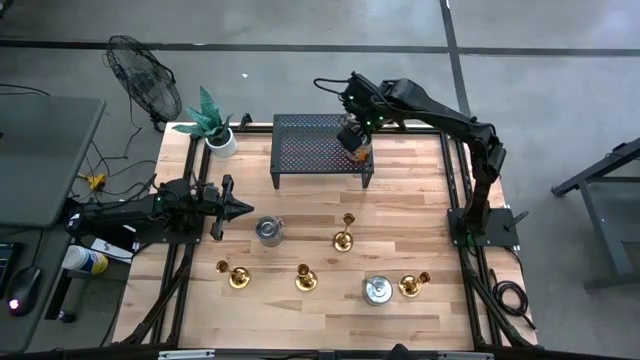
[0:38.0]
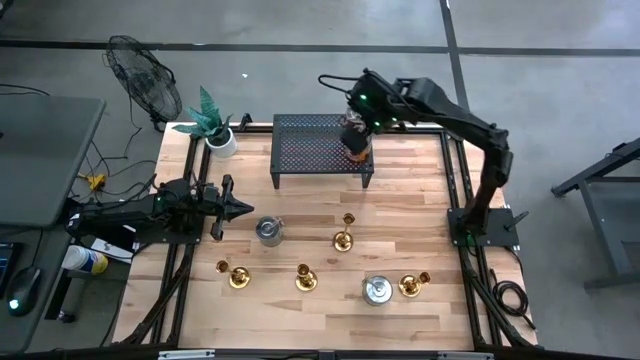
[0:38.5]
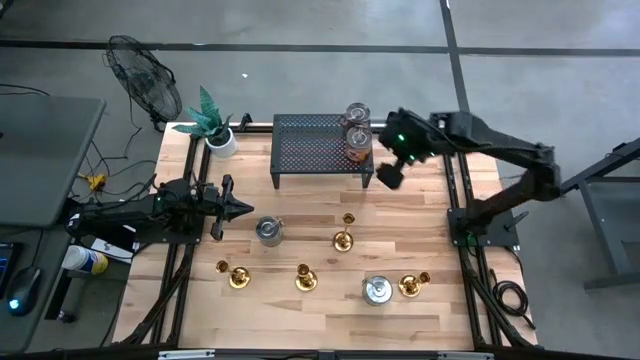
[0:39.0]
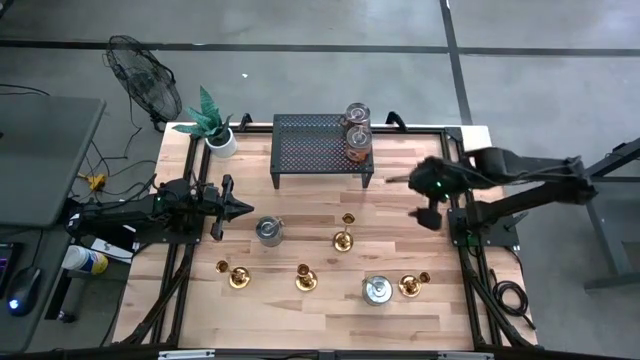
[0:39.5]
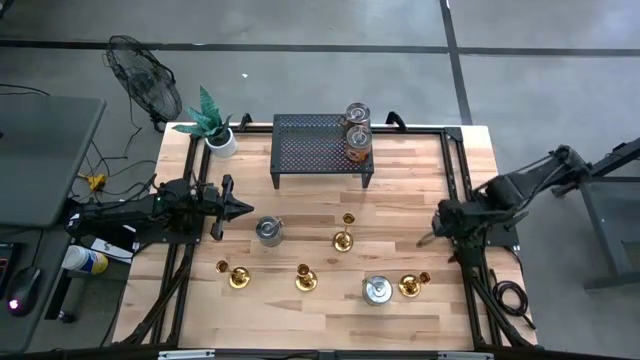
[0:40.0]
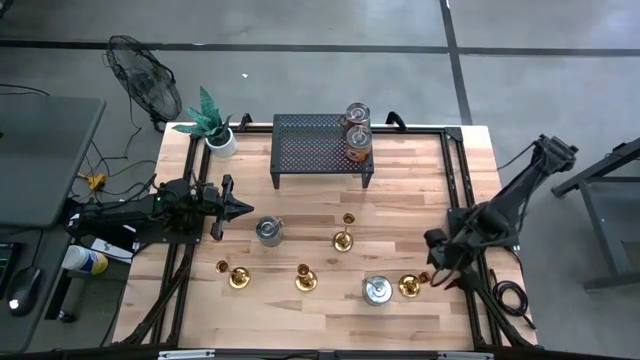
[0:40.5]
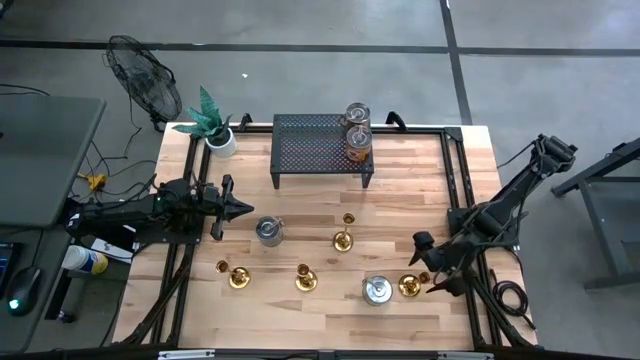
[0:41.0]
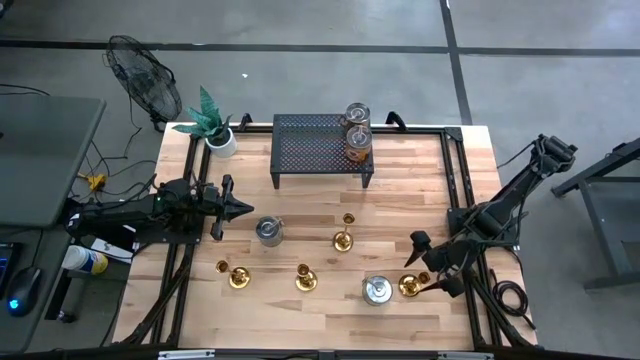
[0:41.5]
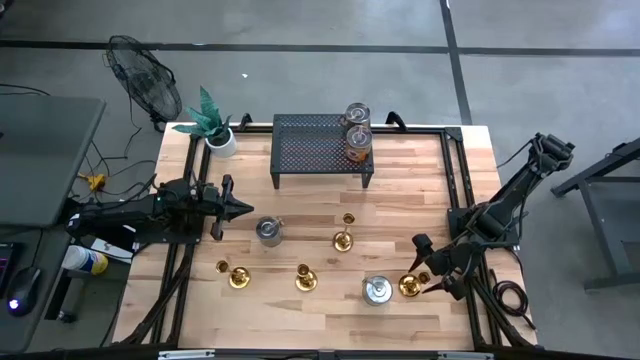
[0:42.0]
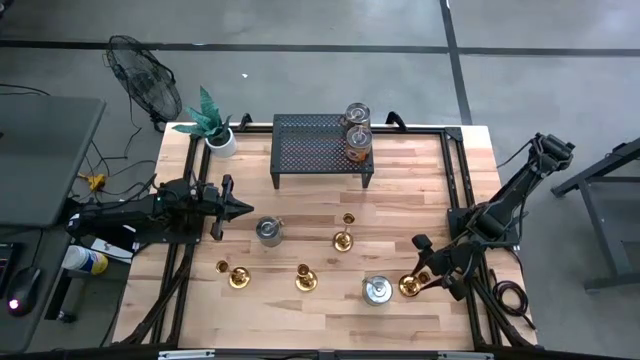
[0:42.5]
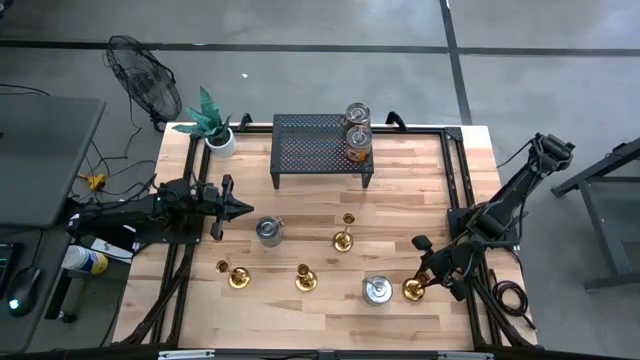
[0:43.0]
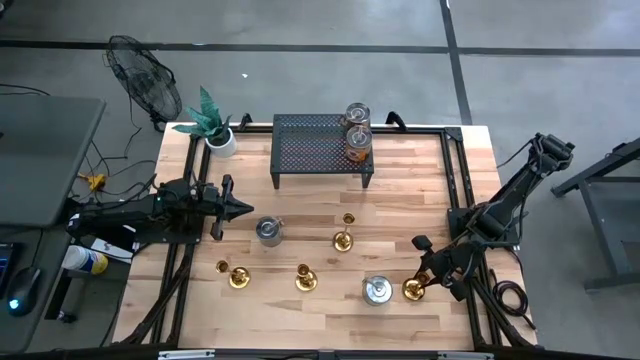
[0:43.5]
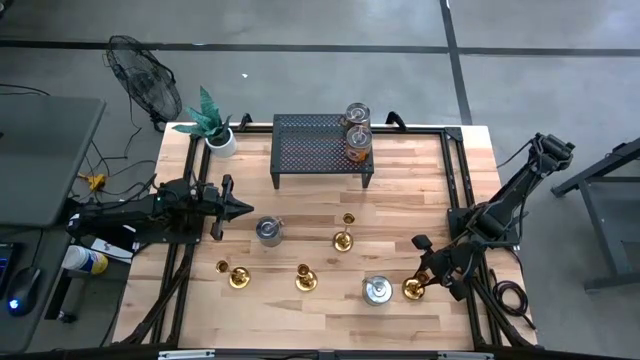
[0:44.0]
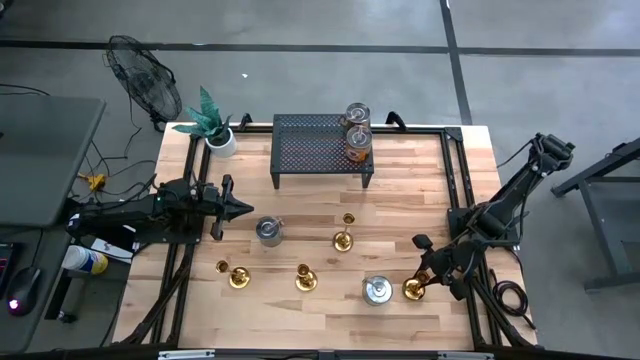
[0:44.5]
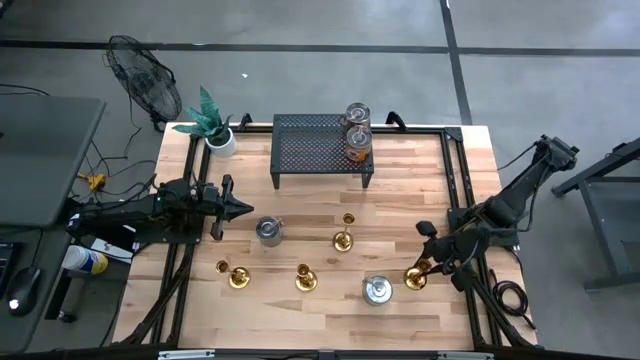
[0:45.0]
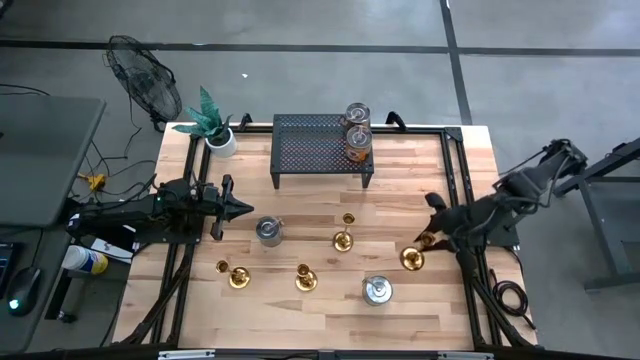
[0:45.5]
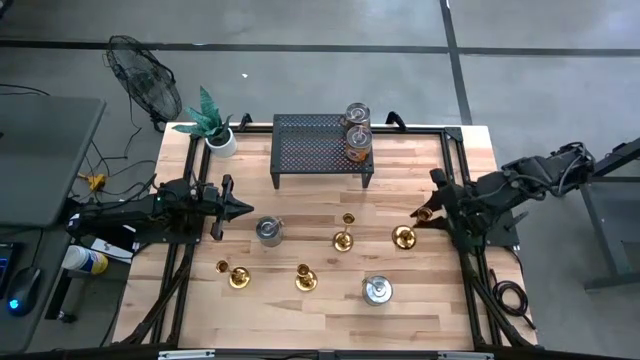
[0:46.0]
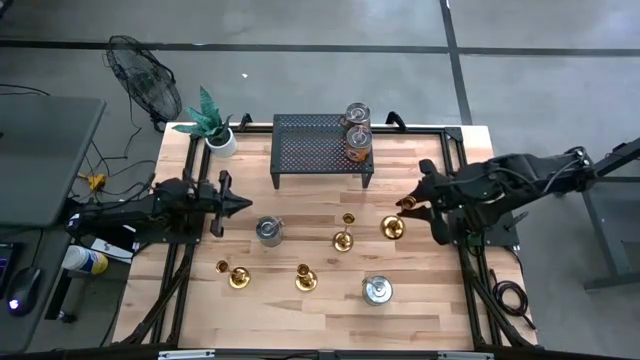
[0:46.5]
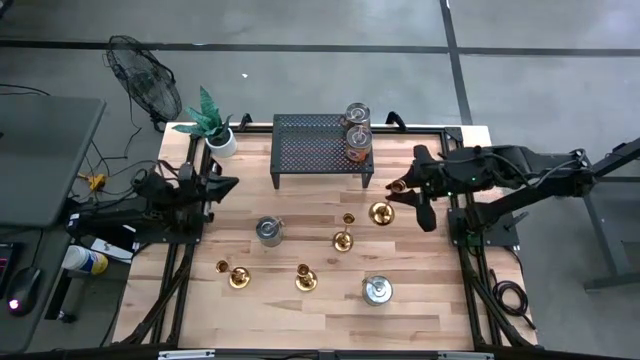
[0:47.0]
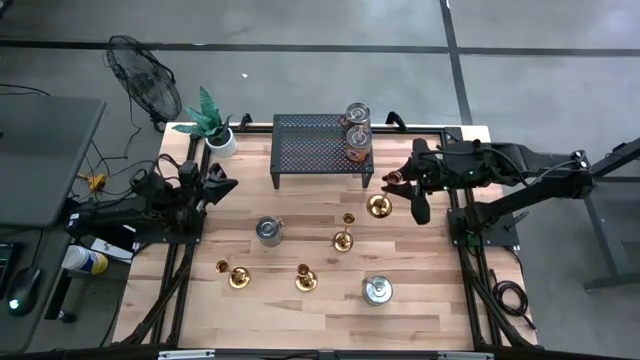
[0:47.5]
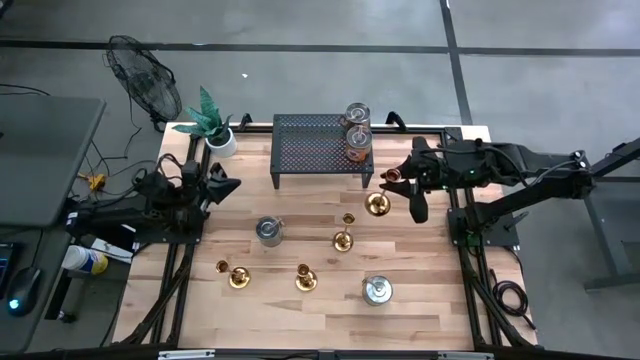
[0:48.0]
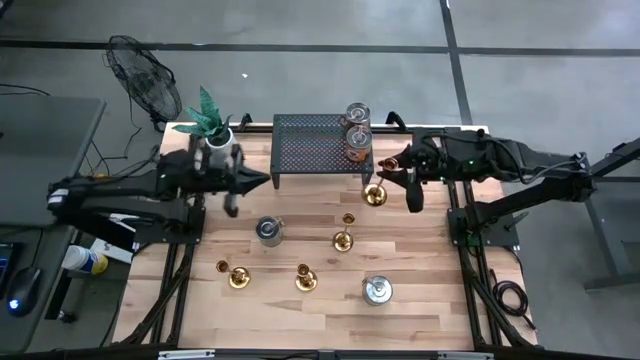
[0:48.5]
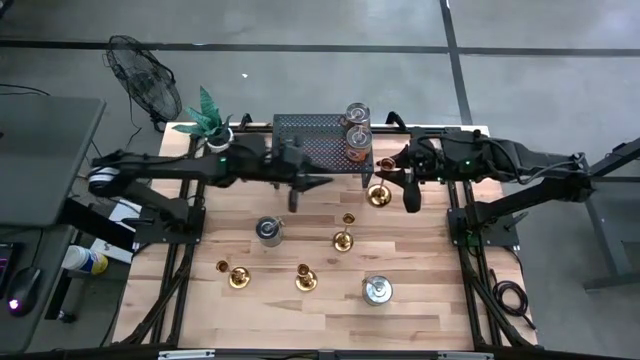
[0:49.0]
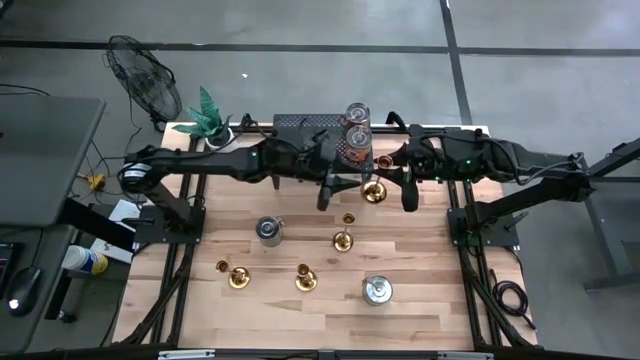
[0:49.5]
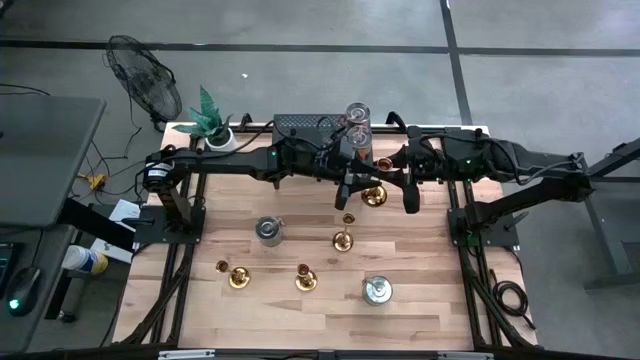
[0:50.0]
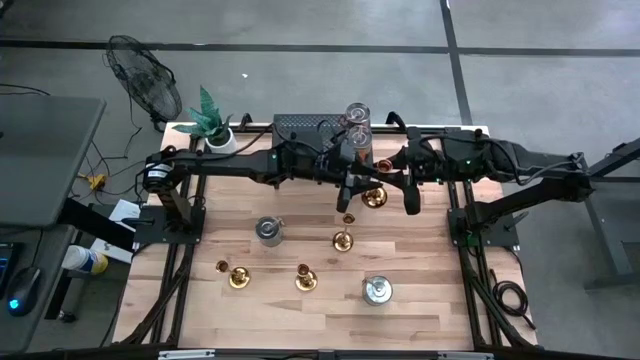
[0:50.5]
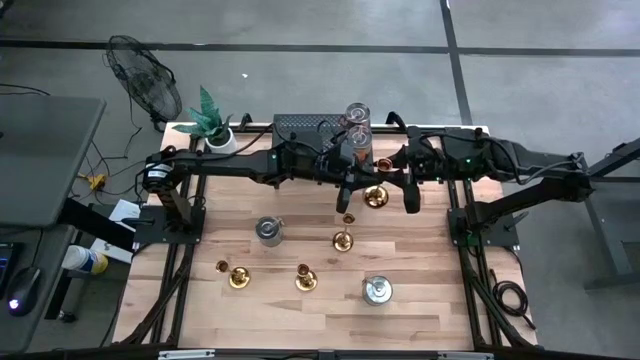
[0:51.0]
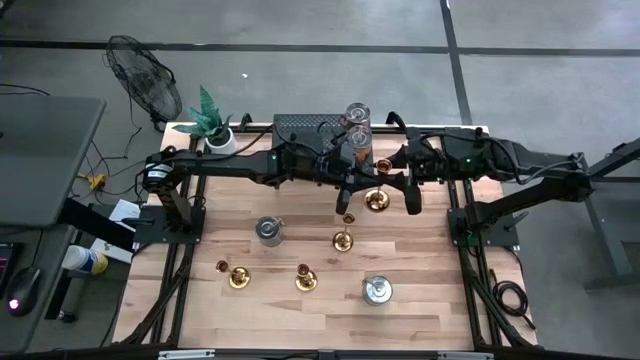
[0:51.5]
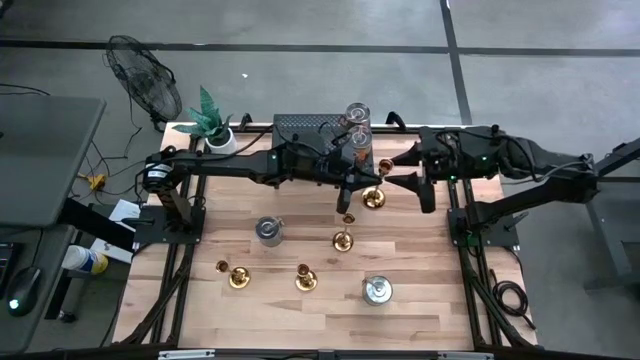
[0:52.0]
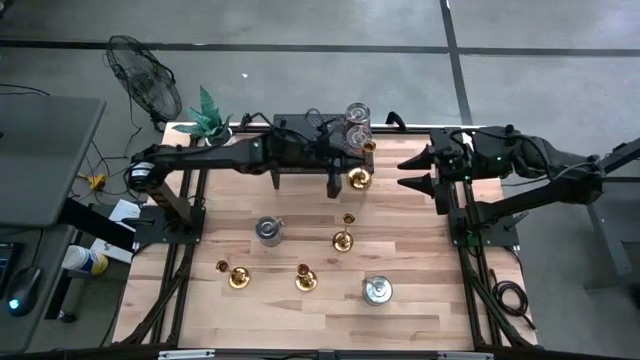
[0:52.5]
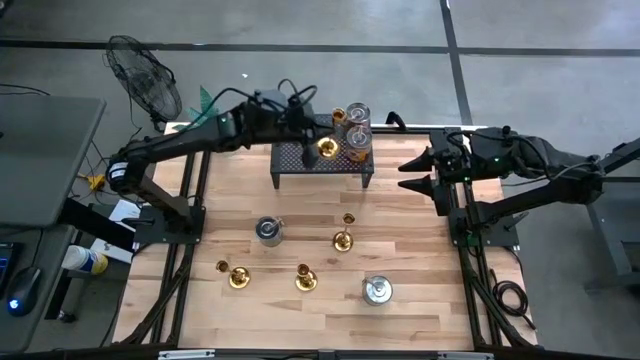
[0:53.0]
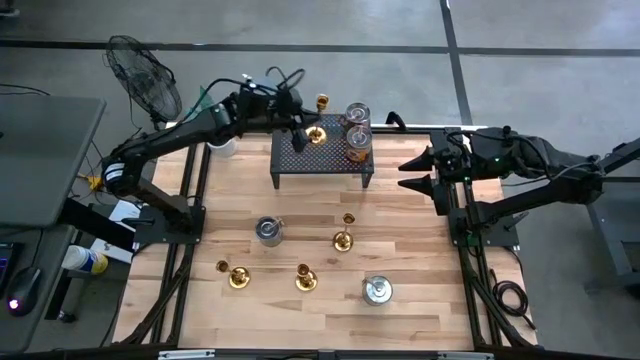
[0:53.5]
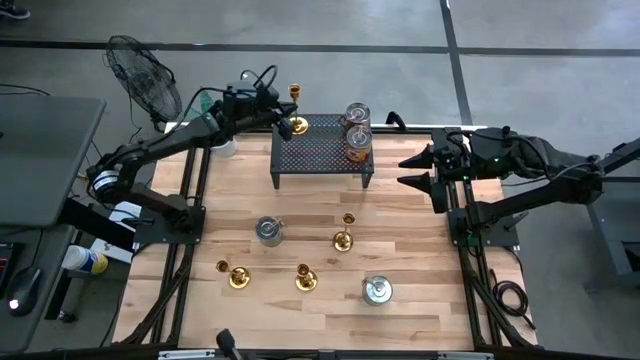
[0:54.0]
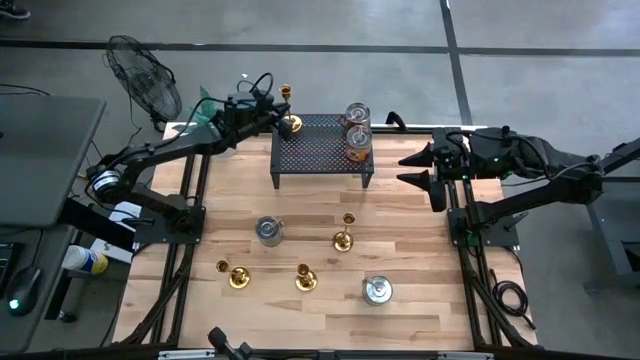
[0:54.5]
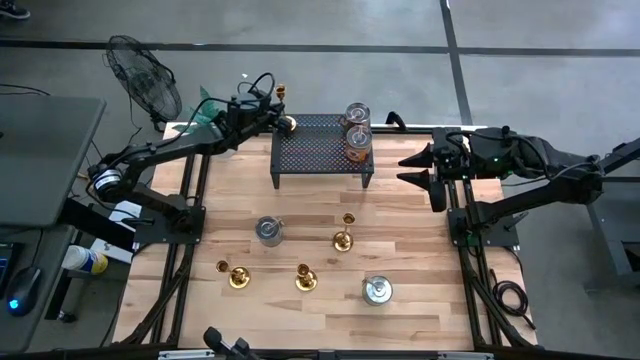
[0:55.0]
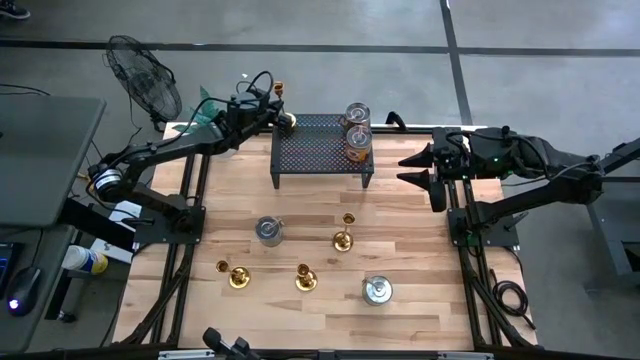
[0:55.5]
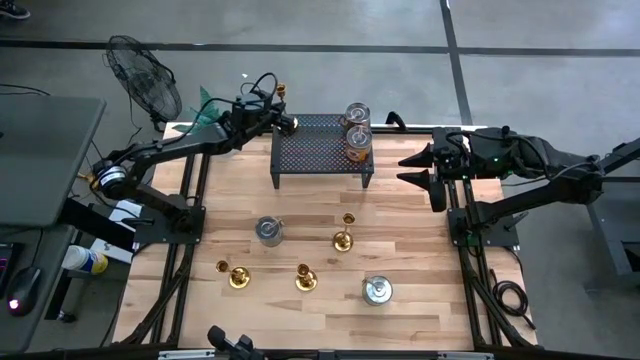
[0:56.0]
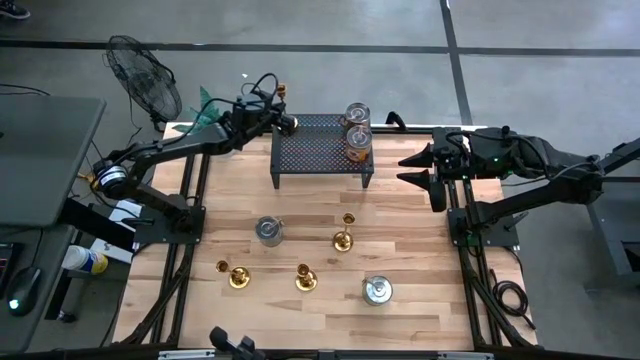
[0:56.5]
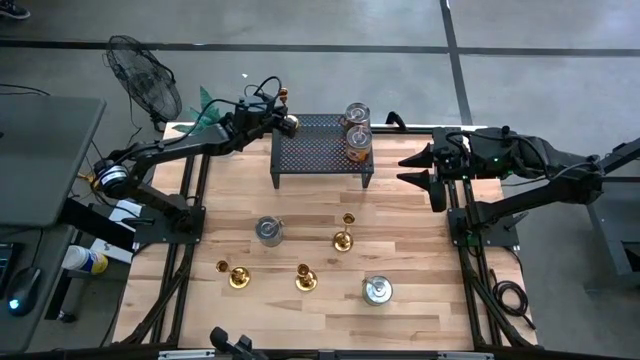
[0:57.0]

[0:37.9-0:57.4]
Task: Pick & Place candle stick holders
Put the gold candle holder on the shelf

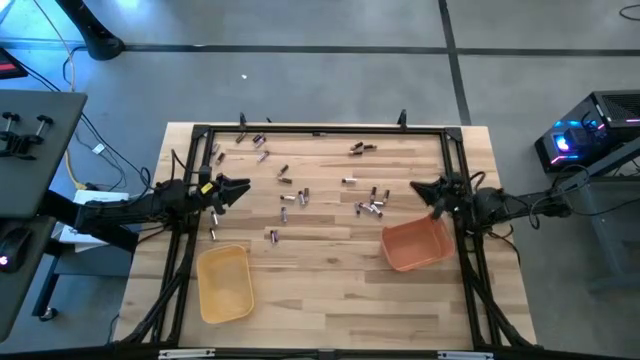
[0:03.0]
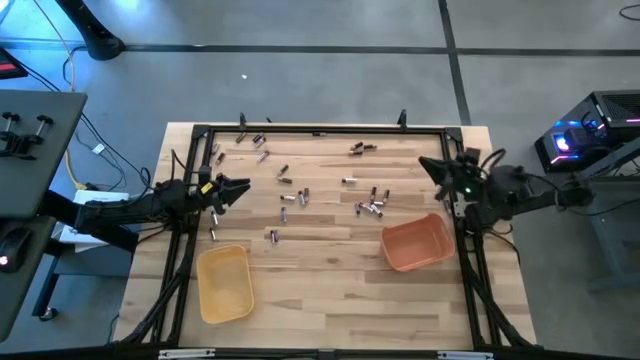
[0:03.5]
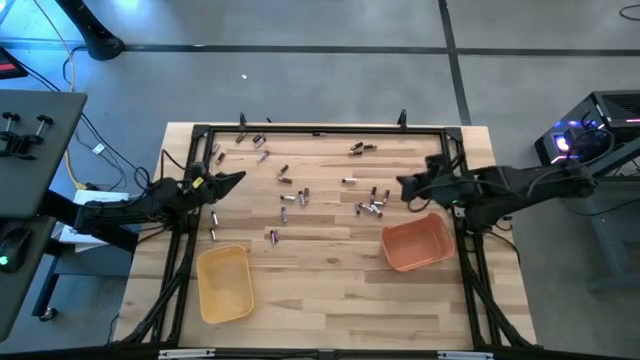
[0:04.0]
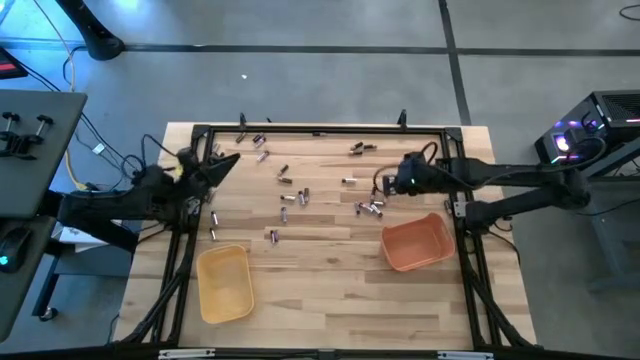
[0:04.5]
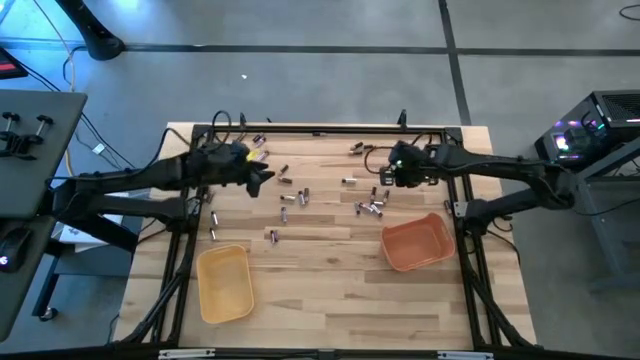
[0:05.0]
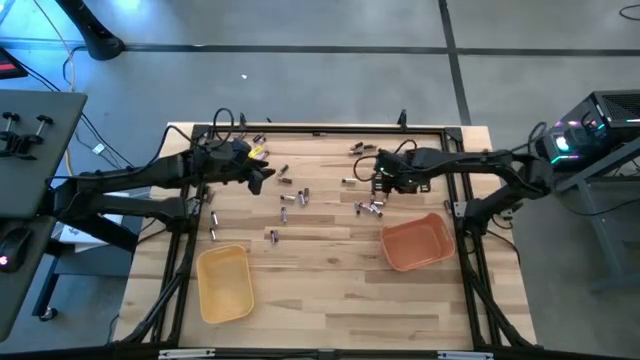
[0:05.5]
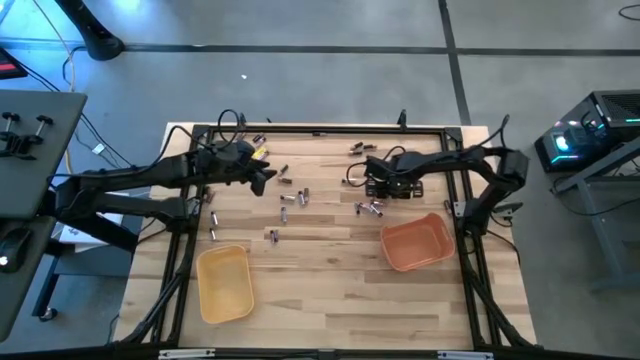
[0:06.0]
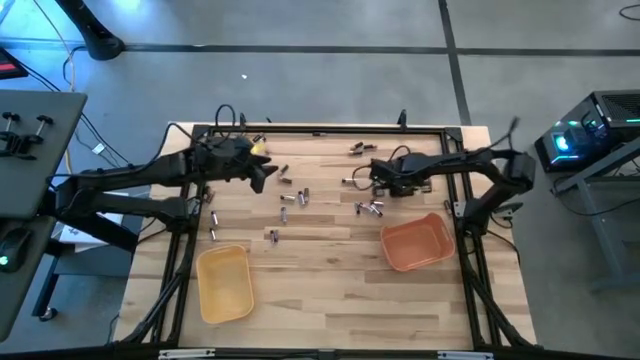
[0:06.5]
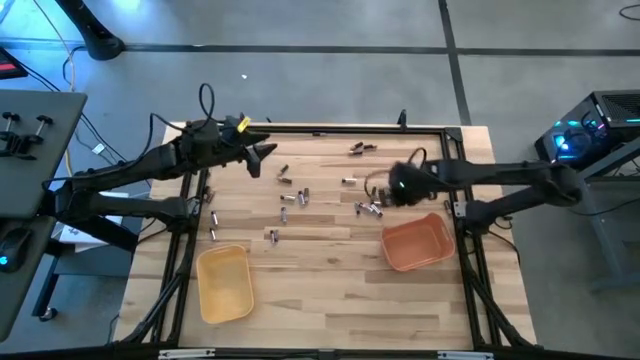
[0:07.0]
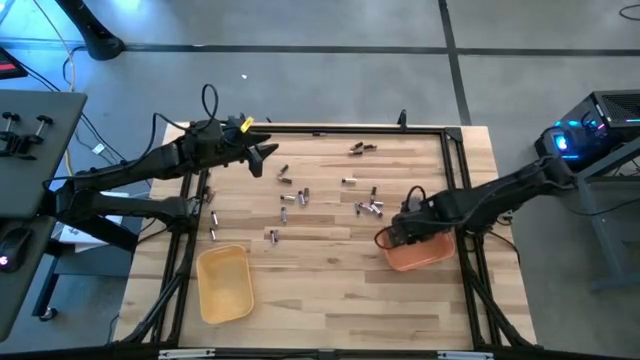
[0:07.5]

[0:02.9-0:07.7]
Task: Sort batteries
Put the black battery into the orange bin
